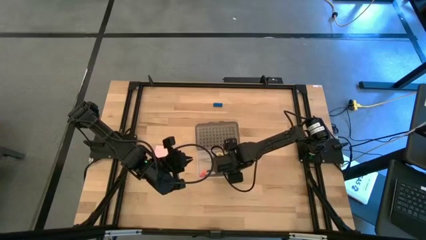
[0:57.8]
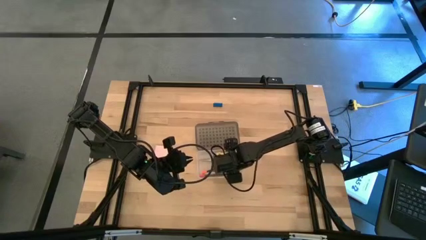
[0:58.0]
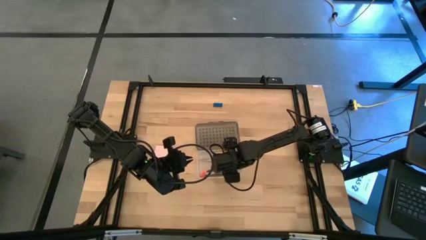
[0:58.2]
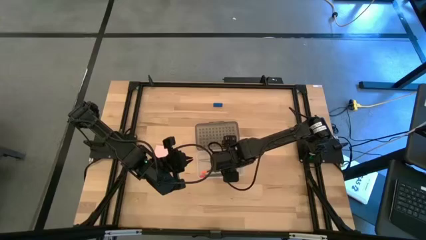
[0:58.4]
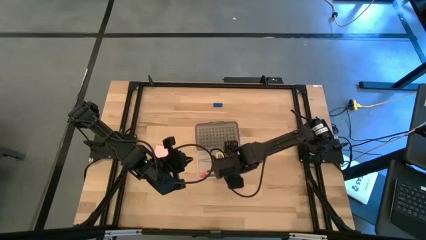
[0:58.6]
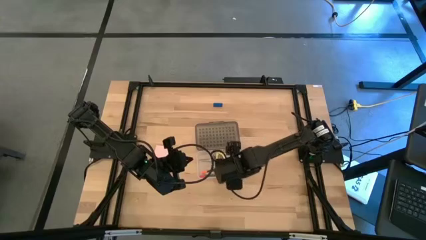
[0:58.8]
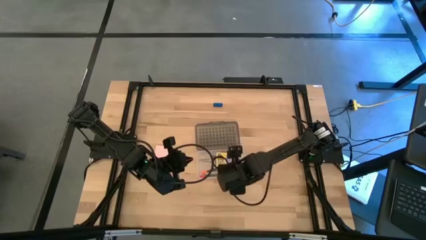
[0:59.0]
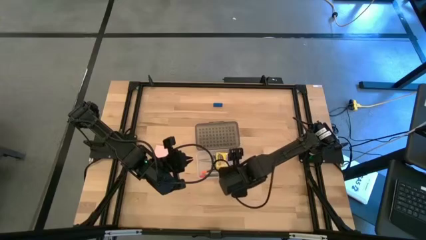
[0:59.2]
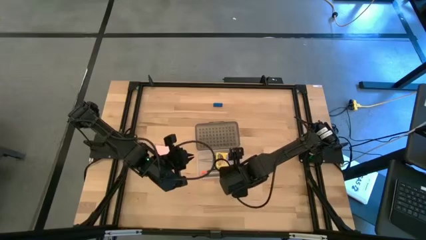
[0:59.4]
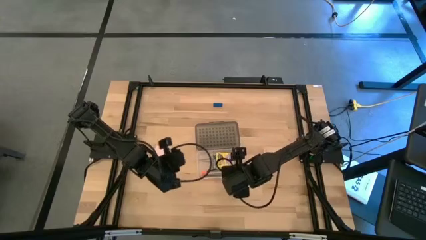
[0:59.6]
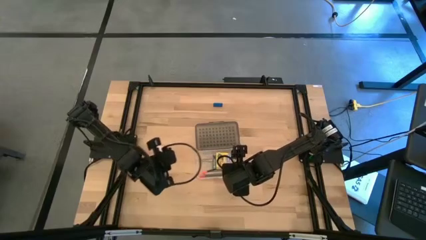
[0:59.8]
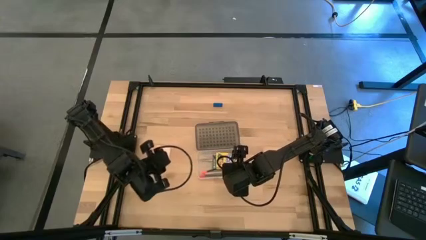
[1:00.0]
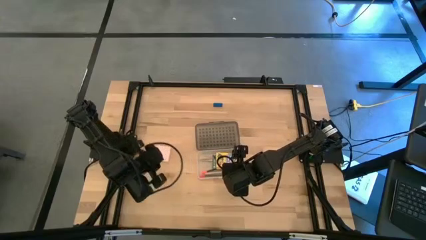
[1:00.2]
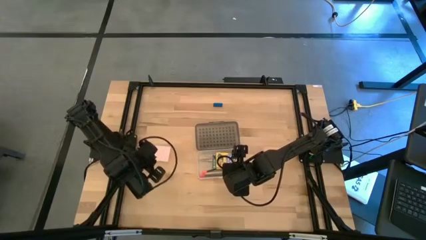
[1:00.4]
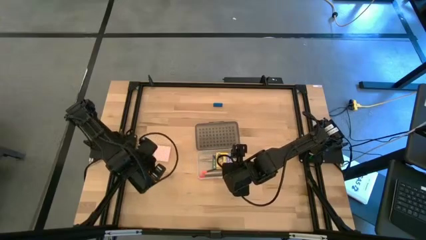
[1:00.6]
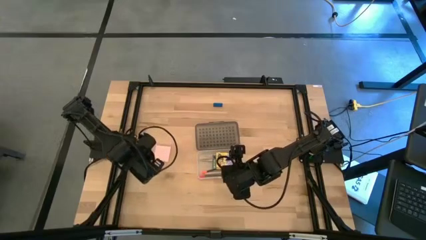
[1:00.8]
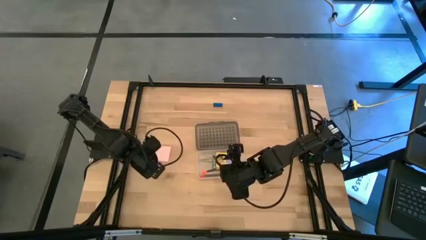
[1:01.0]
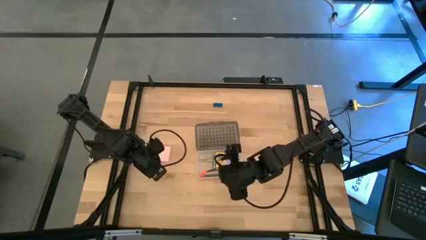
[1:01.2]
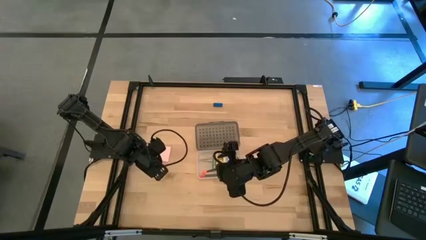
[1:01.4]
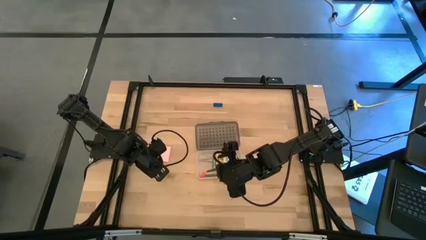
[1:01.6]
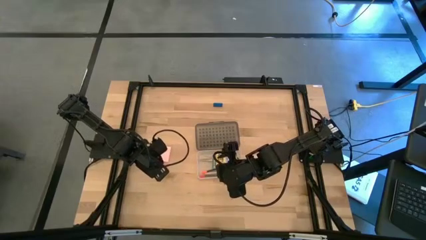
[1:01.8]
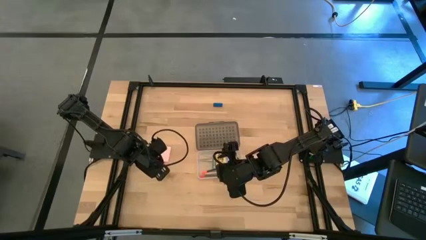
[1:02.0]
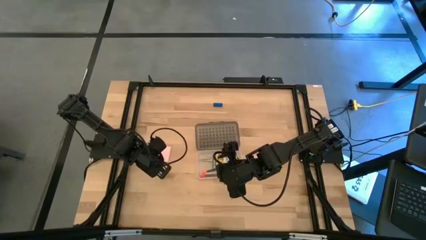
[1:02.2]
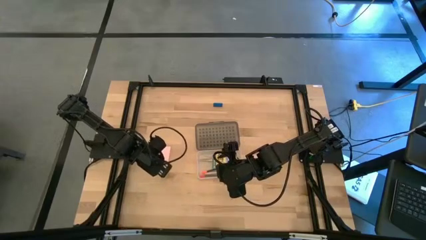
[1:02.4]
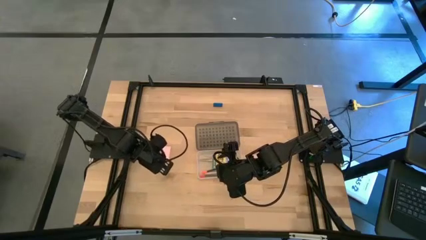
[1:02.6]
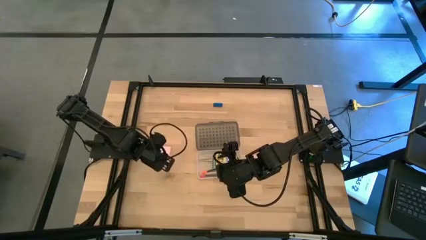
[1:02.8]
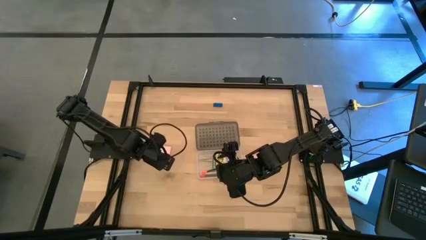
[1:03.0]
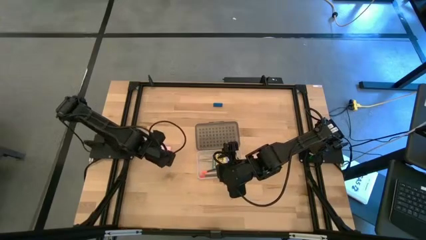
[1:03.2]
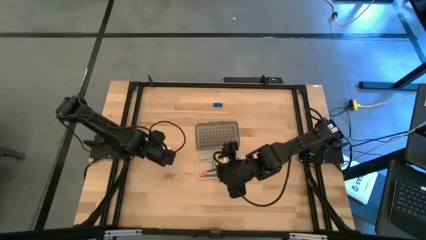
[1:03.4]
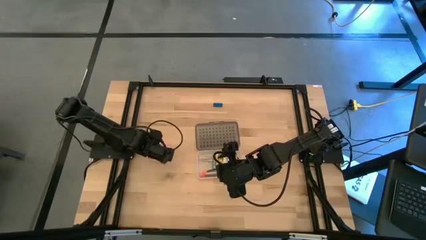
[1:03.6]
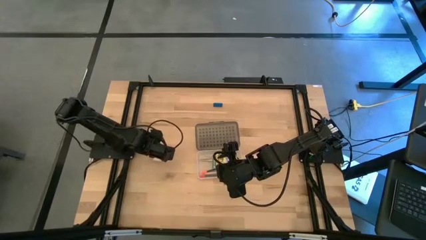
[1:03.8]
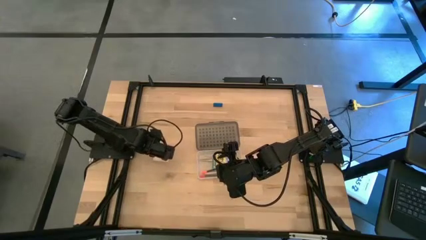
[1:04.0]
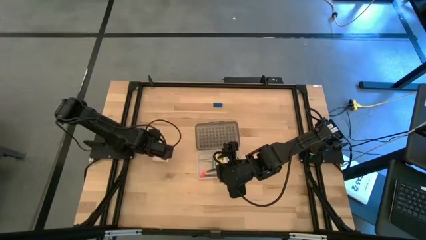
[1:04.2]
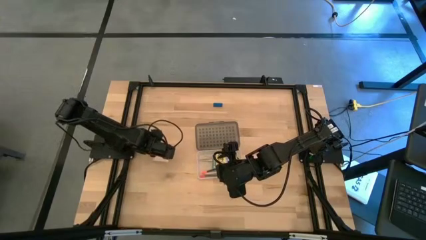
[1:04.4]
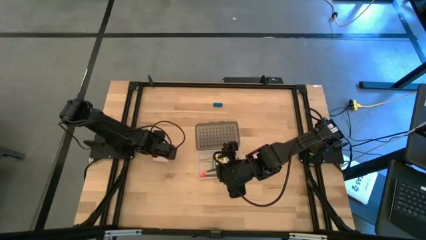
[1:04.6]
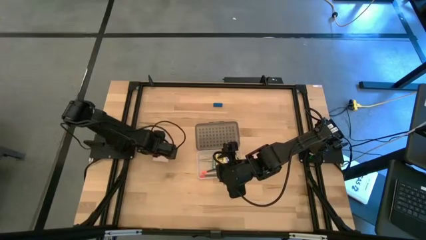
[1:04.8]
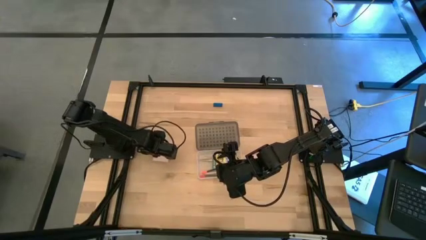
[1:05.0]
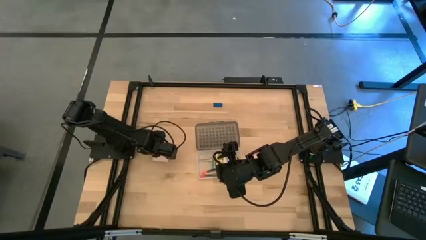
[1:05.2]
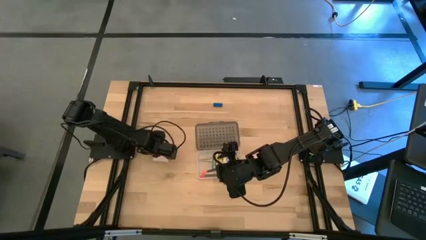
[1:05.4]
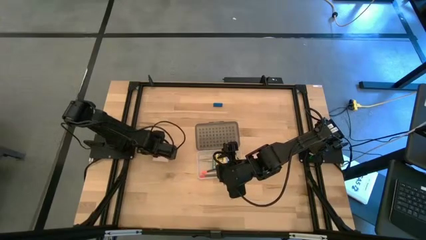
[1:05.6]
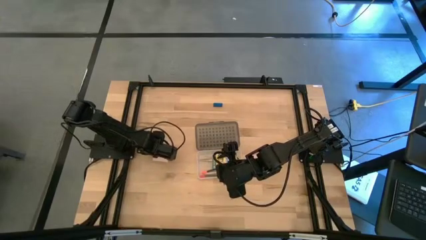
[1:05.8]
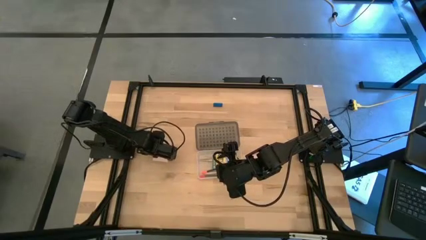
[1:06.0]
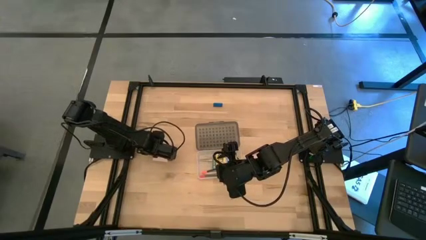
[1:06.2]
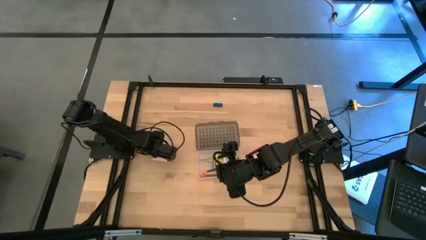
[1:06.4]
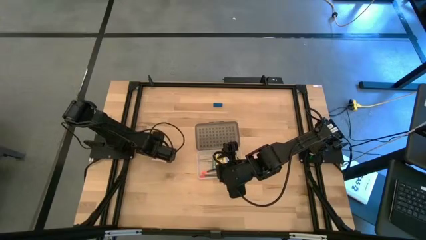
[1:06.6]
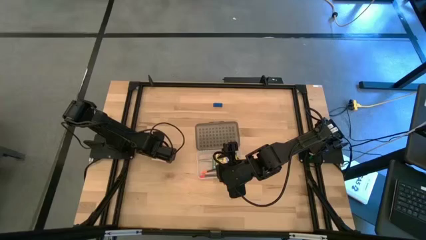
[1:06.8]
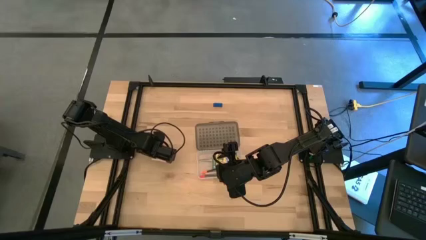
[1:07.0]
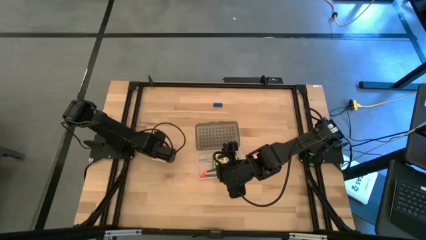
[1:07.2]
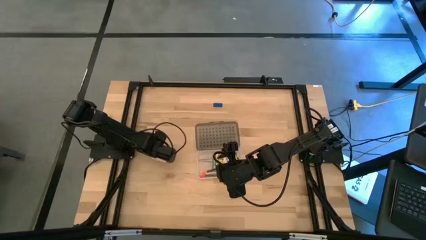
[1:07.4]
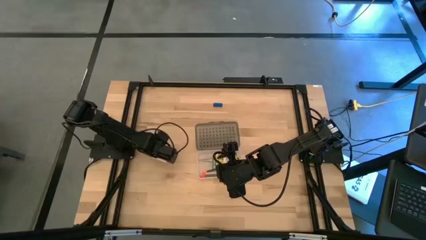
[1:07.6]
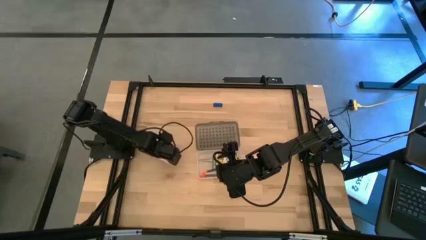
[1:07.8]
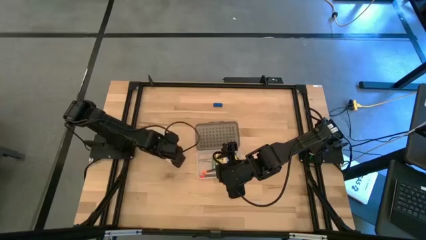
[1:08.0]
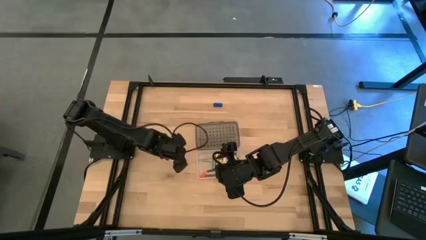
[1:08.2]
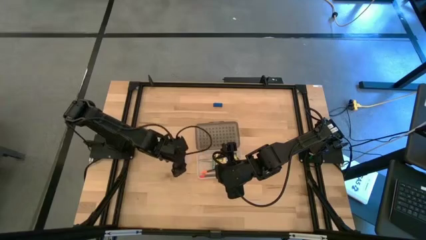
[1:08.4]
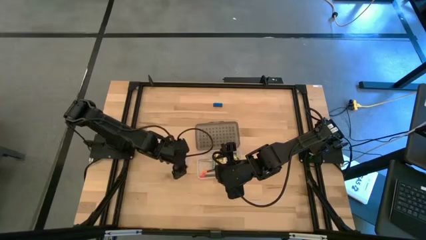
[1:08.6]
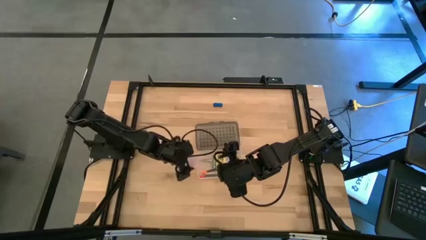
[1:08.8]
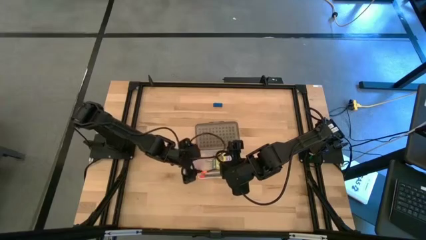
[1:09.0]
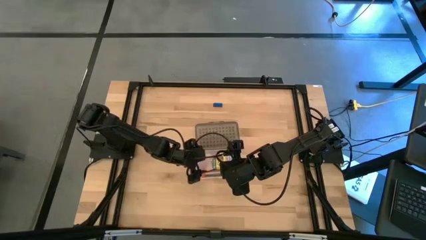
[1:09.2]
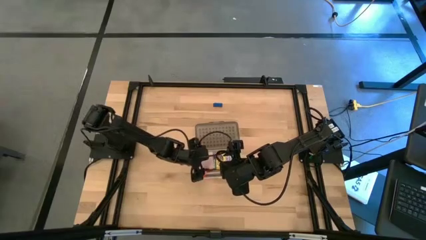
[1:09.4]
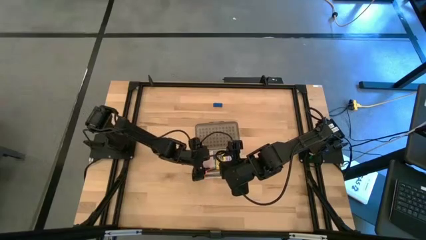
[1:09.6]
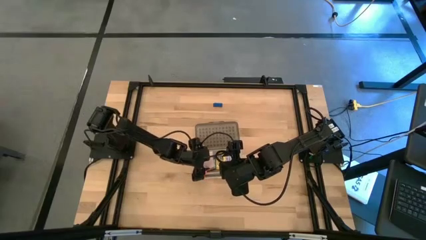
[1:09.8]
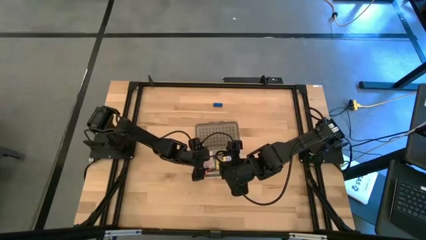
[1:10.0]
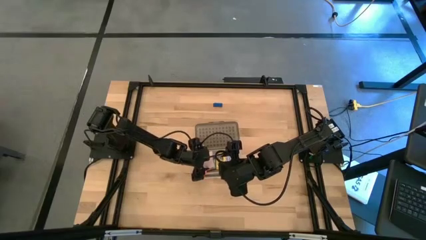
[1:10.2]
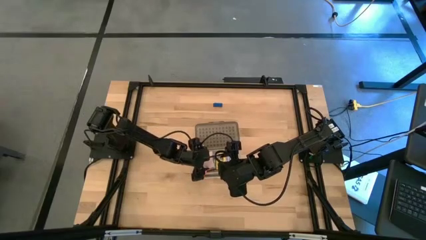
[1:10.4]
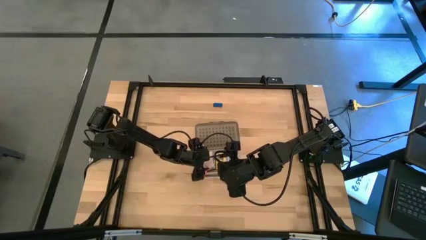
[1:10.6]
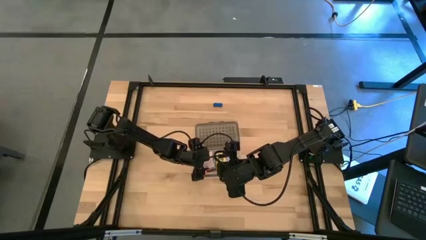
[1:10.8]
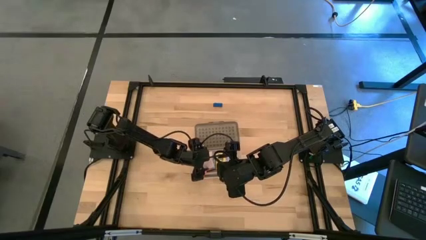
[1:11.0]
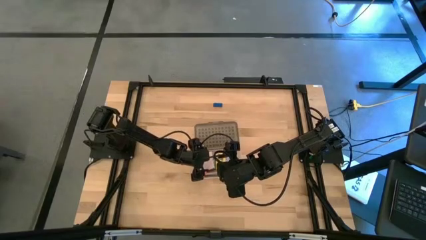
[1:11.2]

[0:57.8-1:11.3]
Task: Pack school essentials
Put the pink sticky notes into the black supply box
